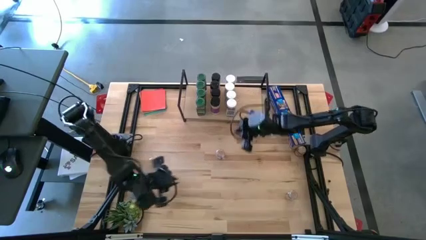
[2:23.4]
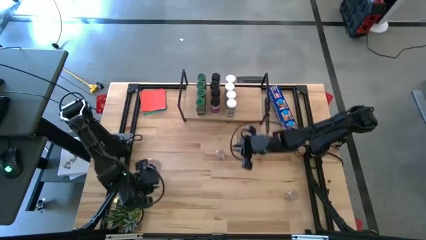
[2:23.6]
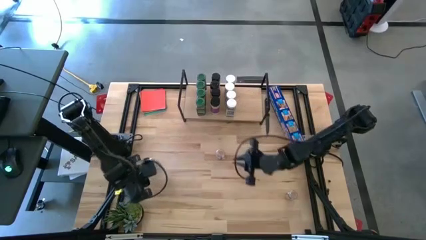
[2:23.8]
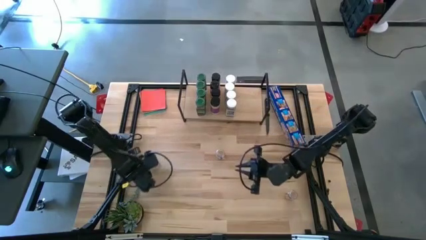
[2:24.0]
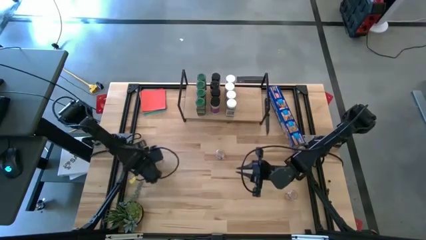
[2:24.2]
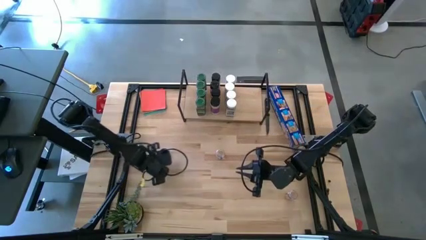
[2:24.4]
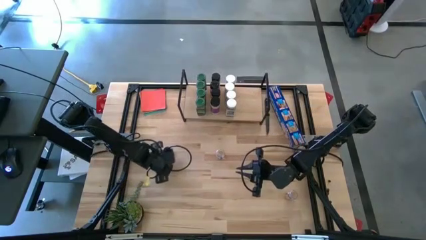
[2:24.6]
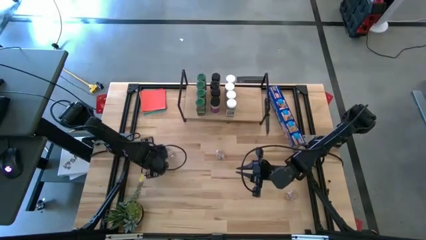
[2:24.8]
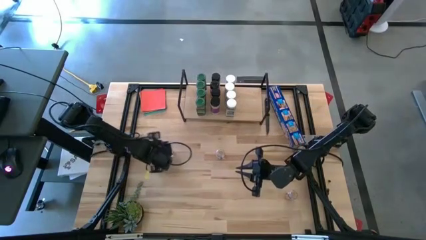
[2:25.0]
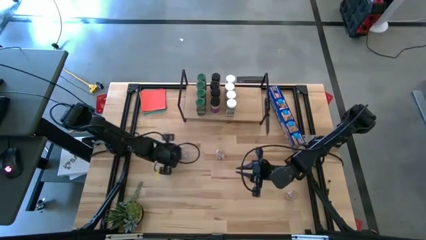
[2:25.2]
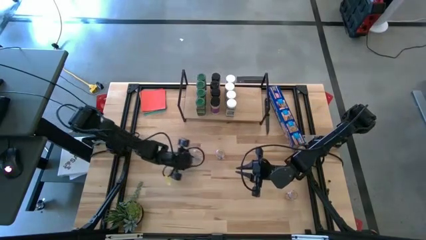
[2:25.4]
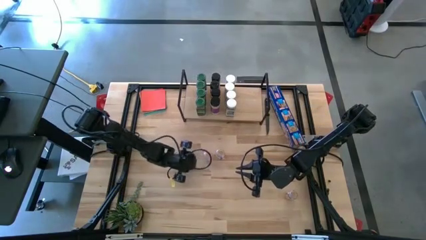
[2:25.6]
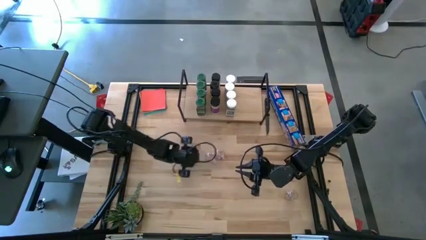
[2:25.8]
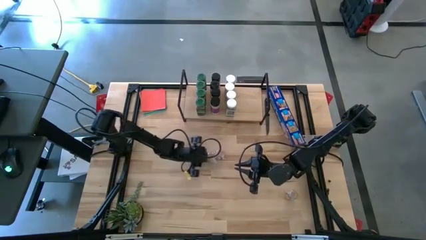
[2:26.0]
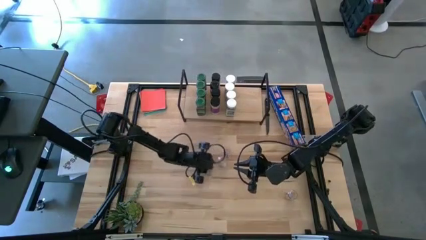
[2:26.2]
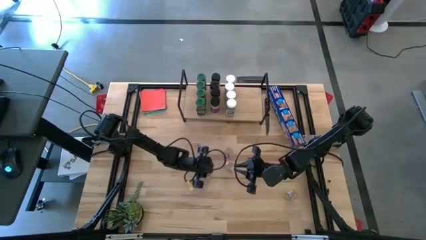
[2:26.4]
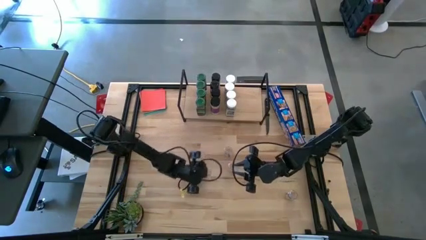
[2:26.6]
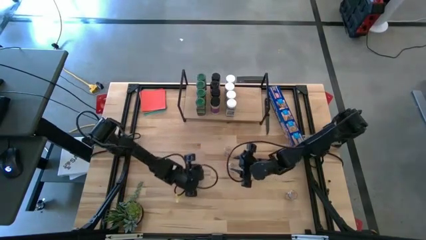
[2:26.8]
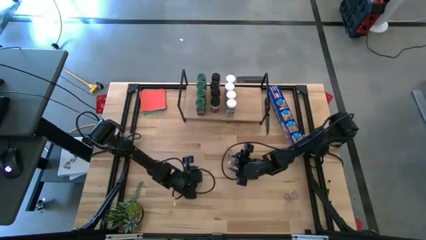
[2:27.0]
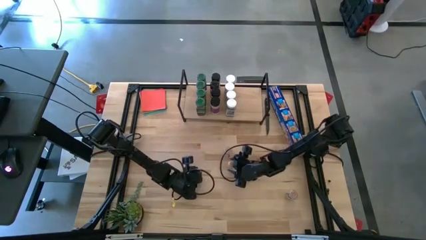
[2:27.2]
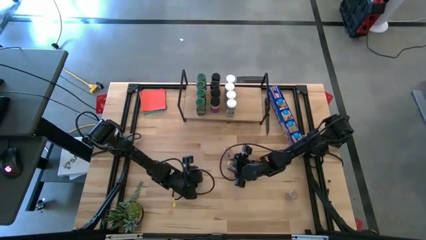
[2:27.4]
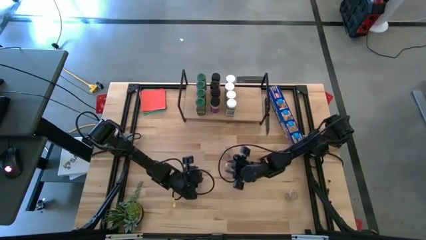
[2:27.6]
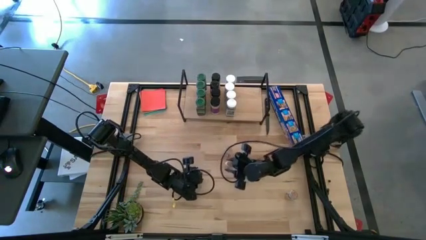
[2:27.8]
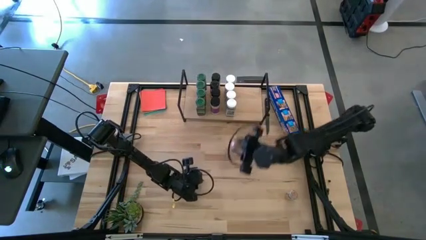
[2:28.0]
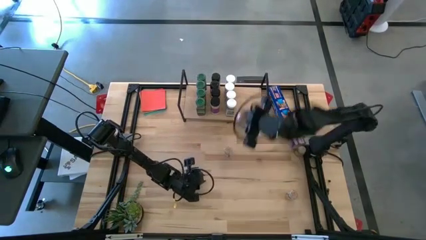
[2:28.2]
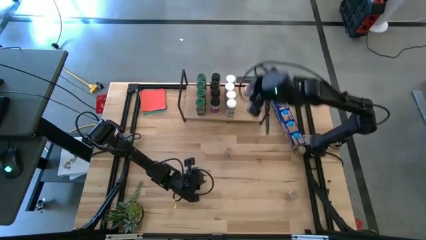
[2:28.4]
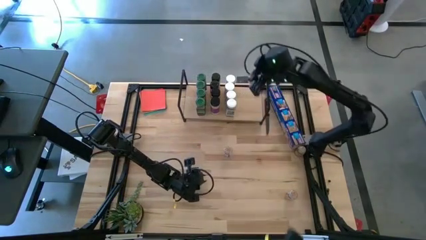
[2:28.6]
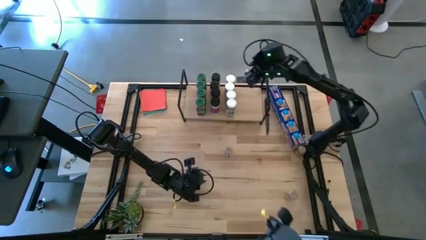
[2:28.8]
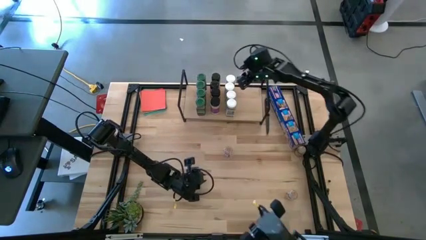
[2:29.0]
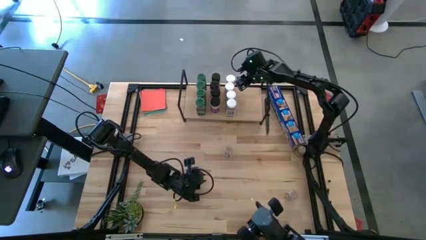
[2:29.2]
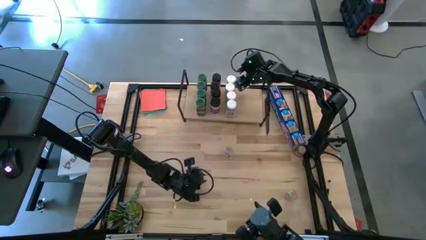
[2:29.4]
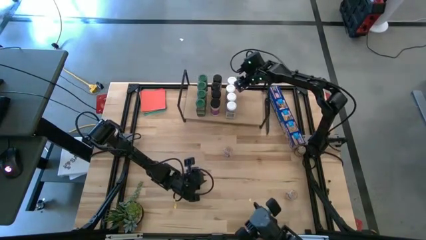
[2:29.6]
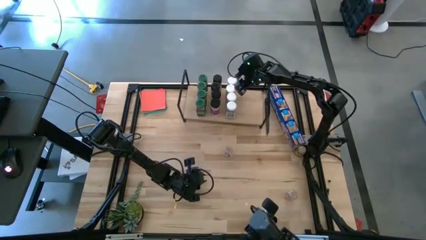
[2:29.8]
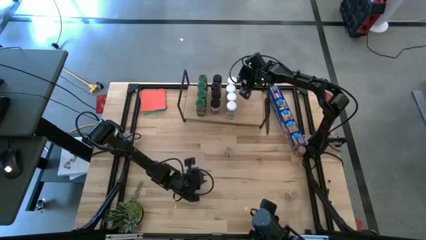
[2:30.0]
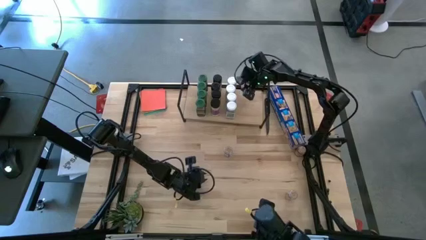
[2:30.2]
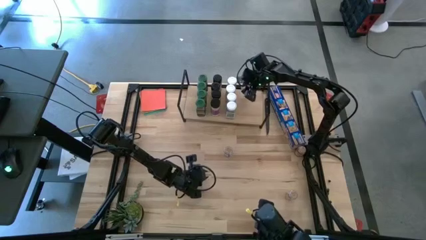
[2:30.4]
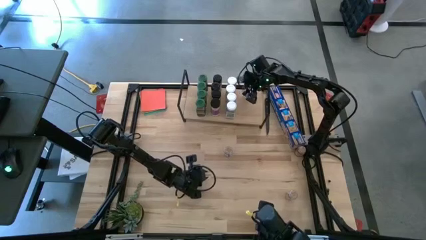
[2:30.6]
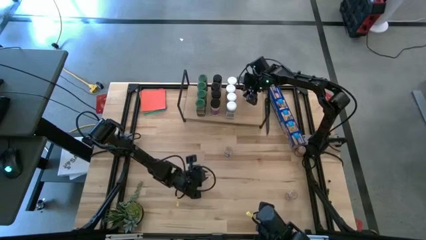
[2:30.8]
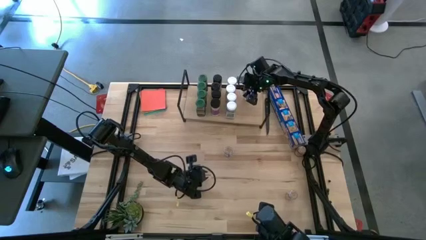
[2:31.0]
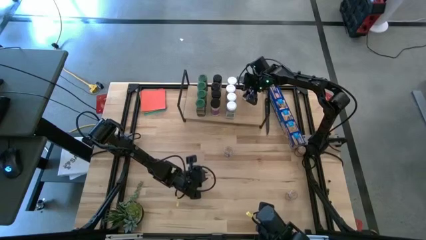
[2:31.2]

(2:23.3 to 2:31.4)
Task: Shelf spices
Put the top left brown seasoning bottle on the shelf

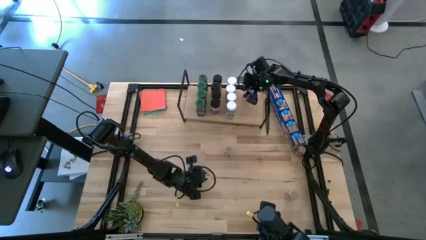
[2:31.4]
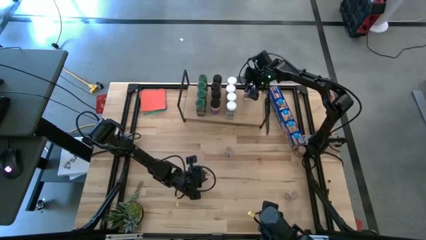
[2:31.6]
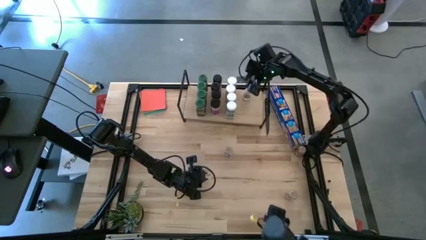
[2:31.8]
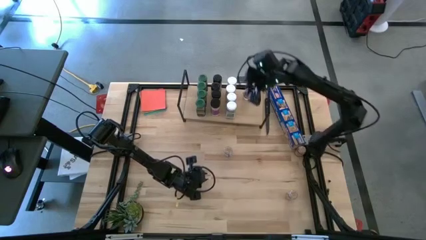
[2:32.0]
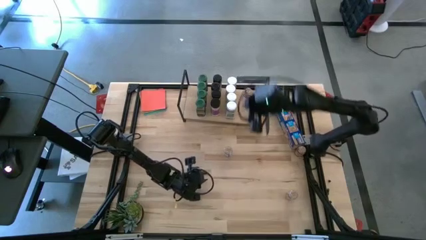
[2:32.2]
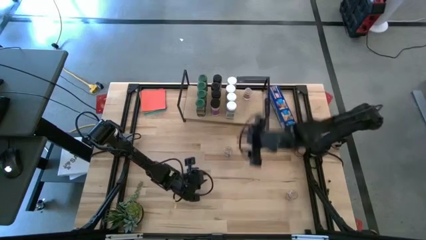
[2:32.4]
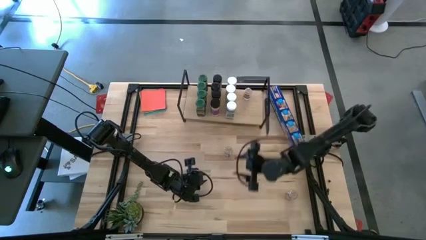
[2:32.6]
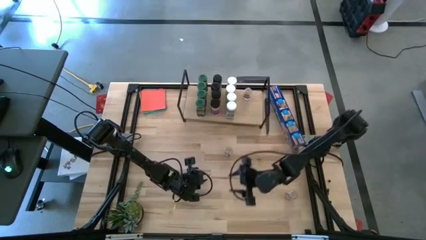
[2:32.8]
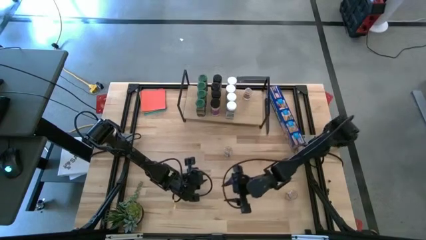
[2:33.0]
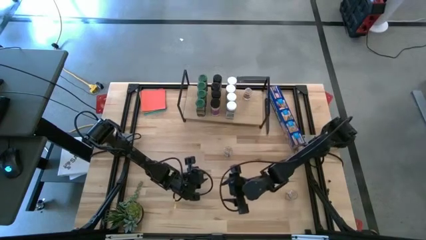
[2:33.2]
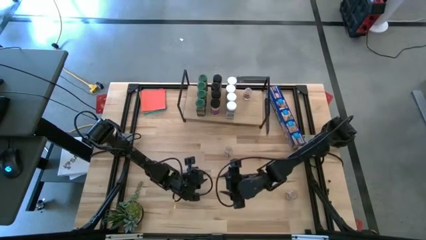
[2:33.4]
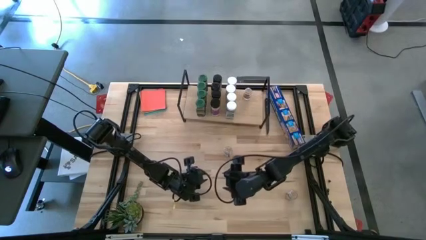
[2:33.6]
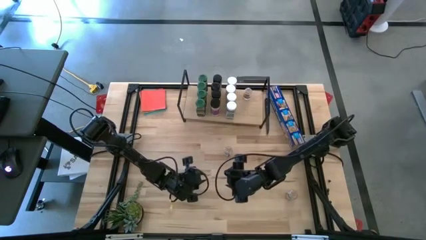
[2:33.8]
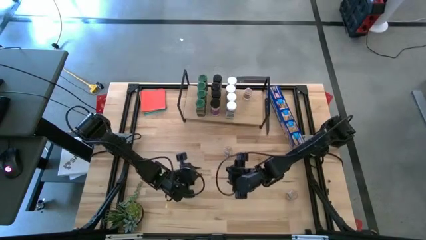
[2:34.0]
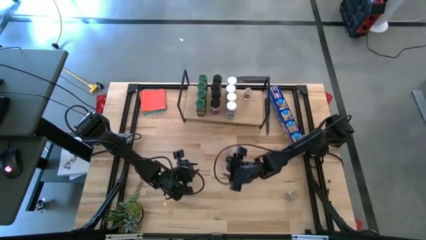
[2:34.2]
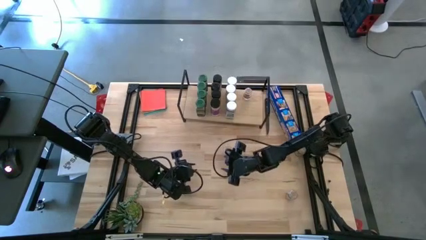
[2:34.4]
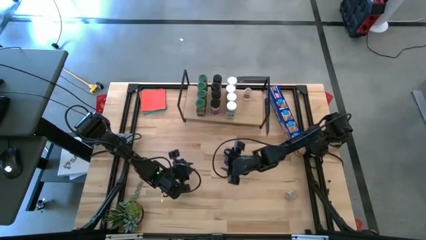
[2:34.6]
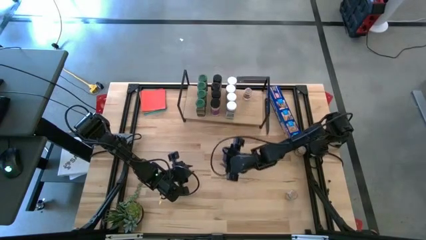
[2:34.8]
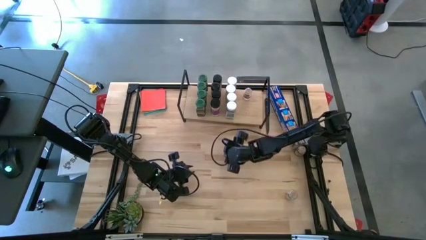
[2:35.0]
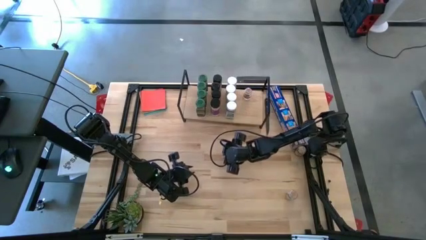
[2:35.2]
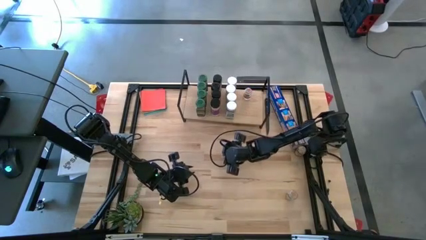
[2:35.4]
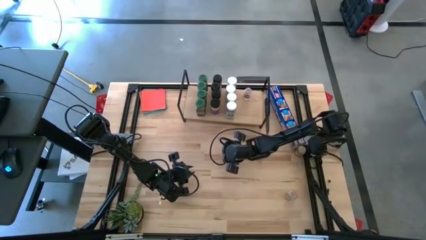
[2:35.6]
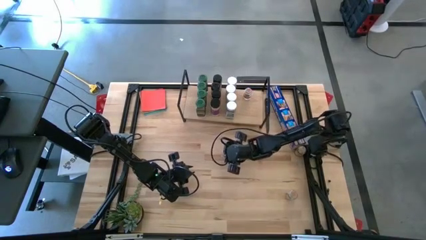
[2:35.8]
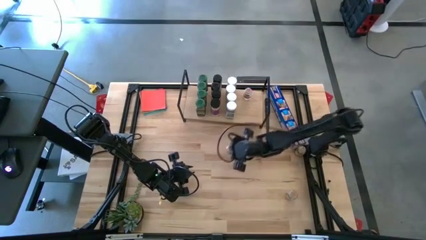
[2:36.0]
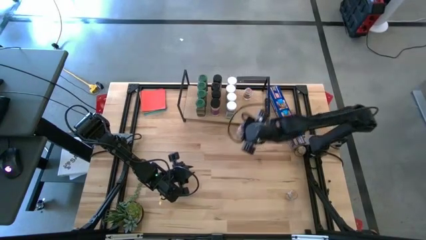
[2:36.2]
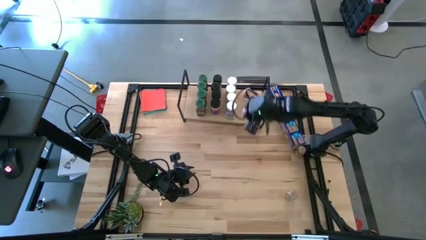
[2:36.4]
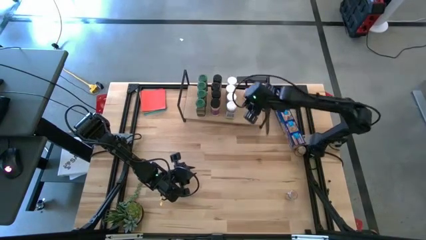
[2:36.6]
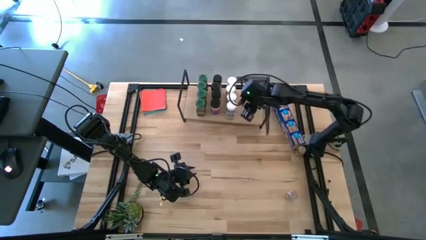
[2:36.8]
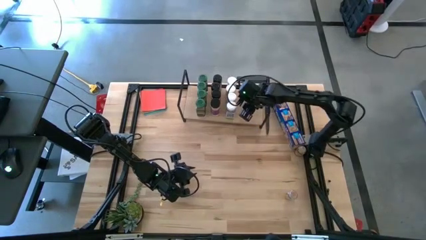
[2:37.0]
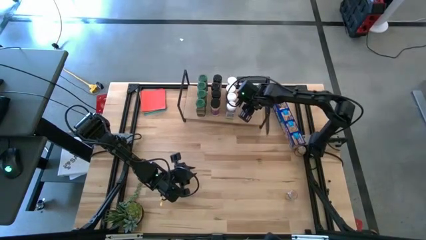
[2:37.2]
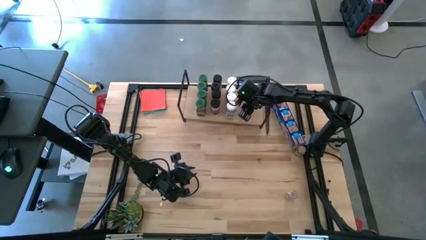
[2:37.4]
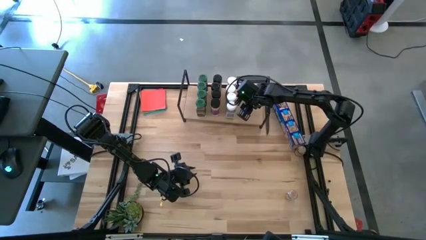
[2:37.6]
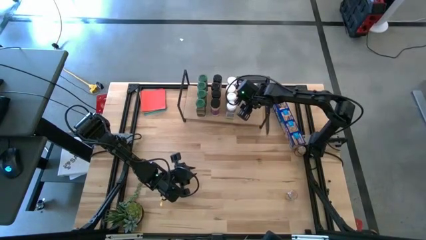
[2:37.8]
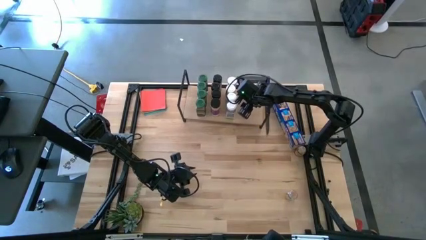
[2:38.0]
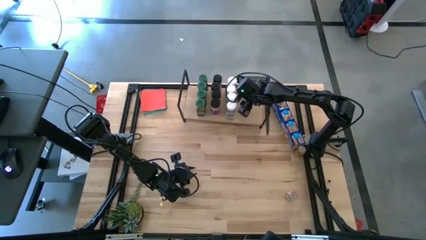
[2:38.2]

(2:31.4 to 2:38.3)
Put the top brown seasoning bottle on the shelf aligned with the other brown seasoning bottle
